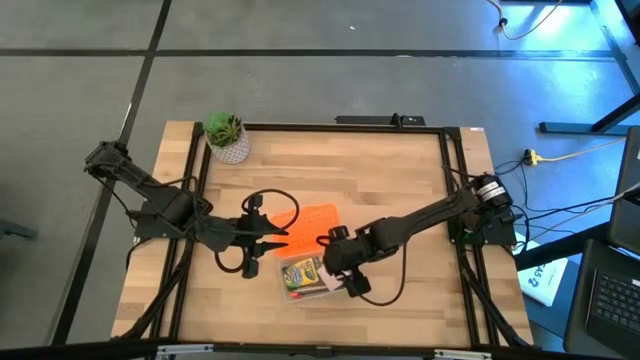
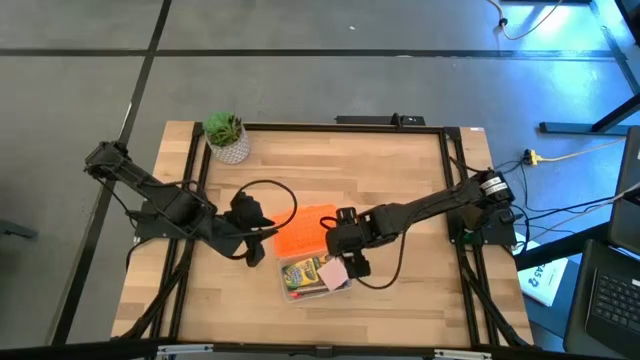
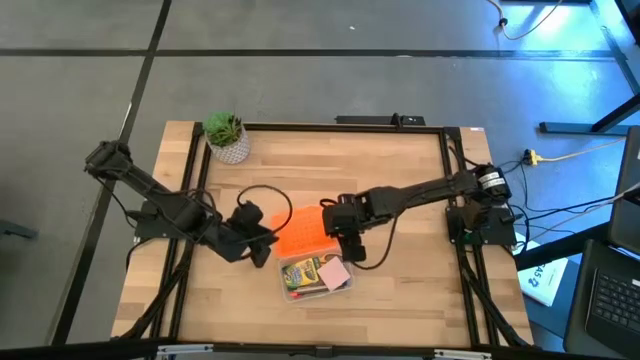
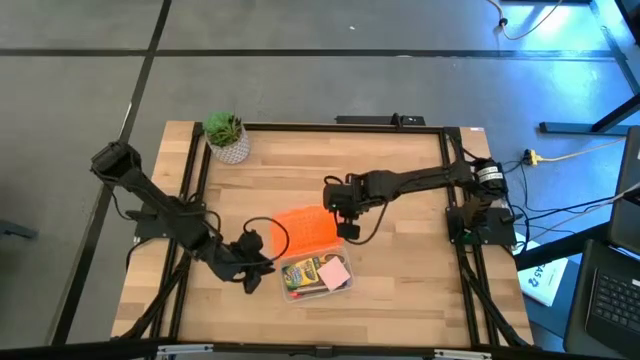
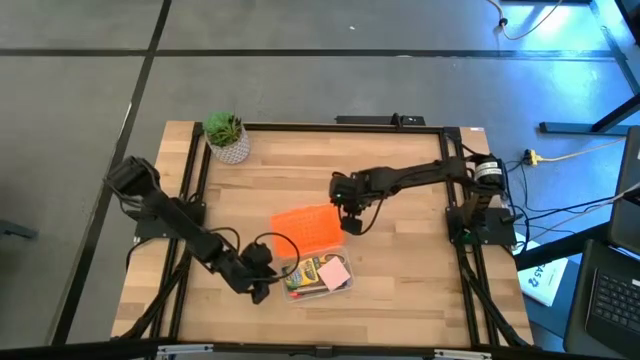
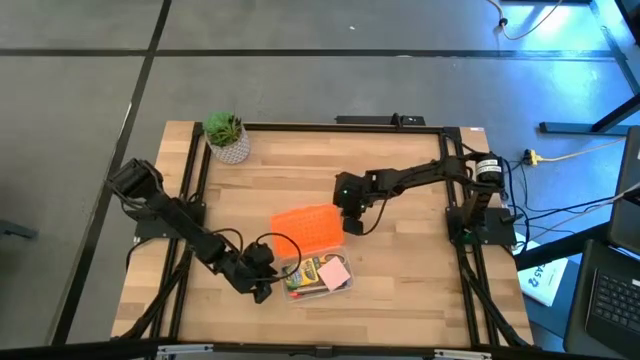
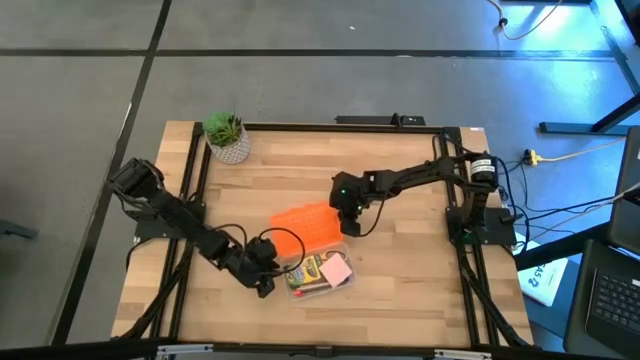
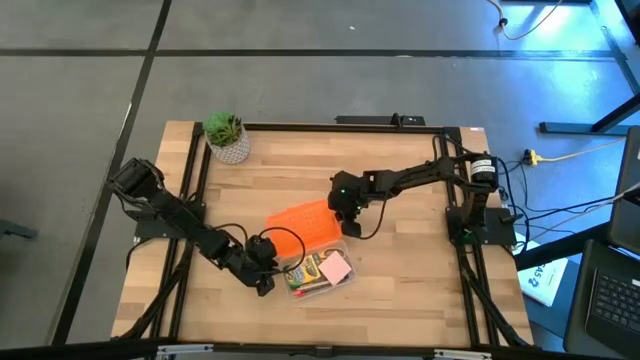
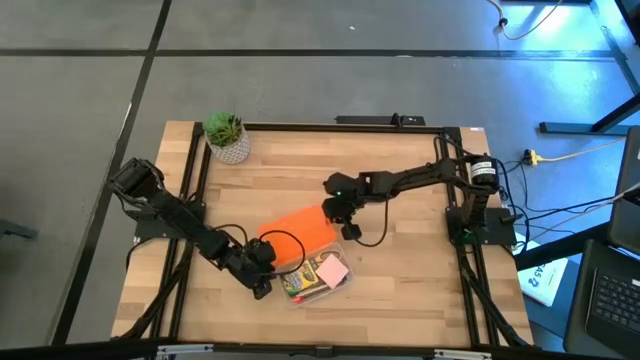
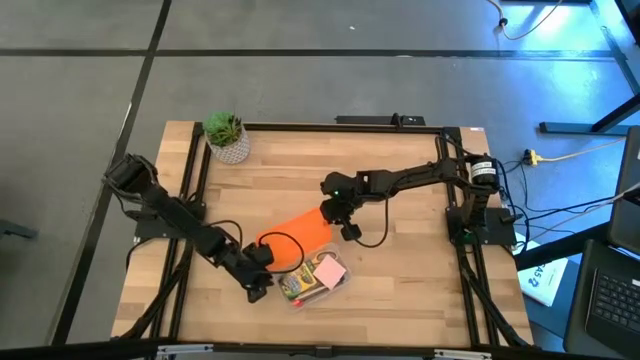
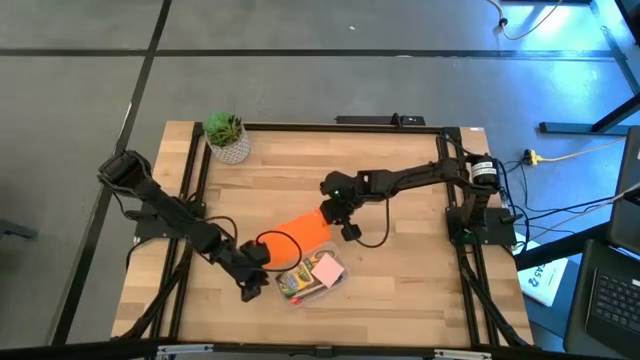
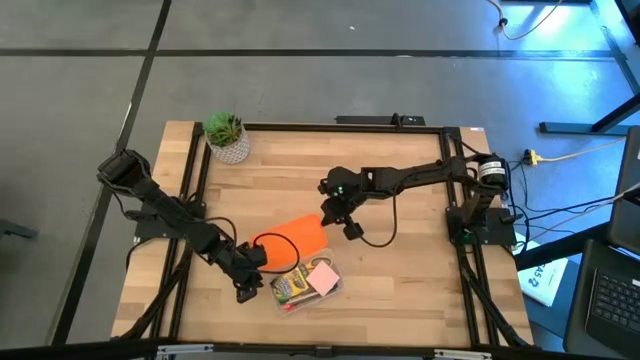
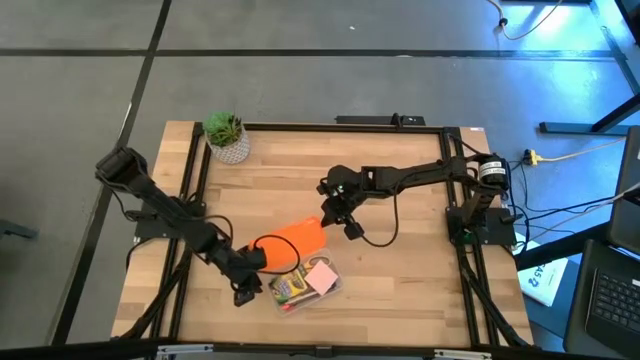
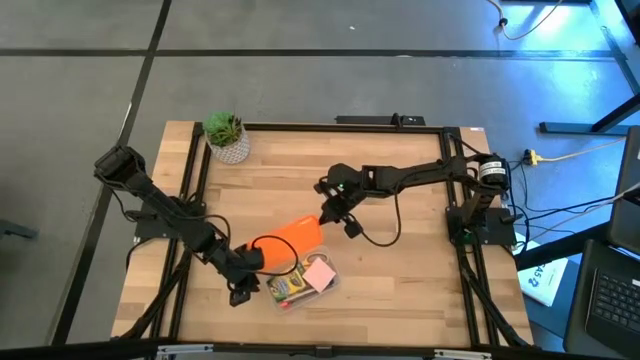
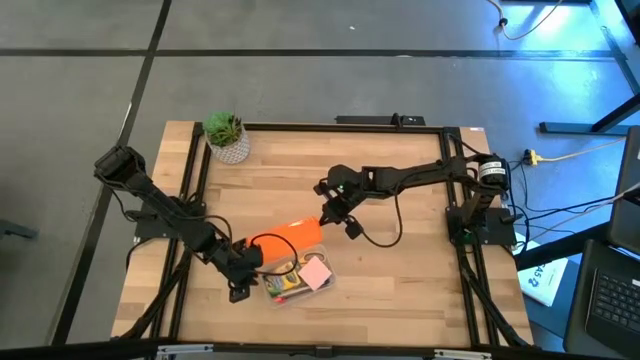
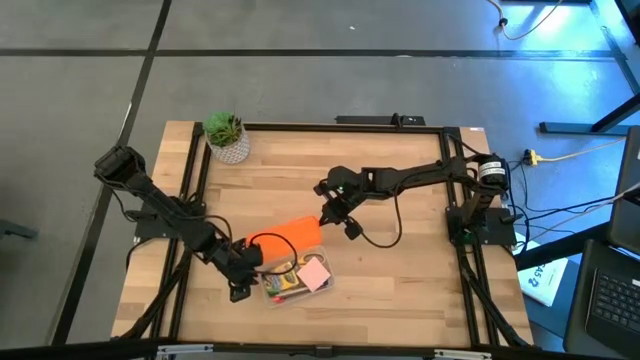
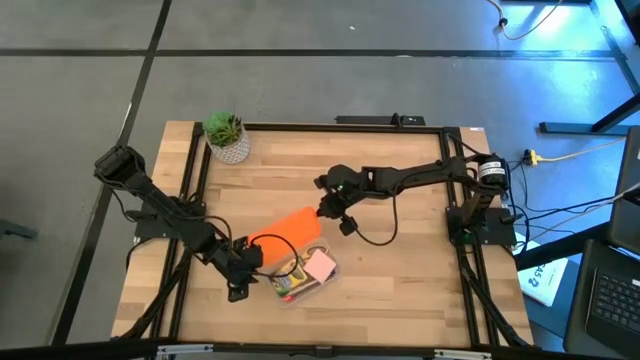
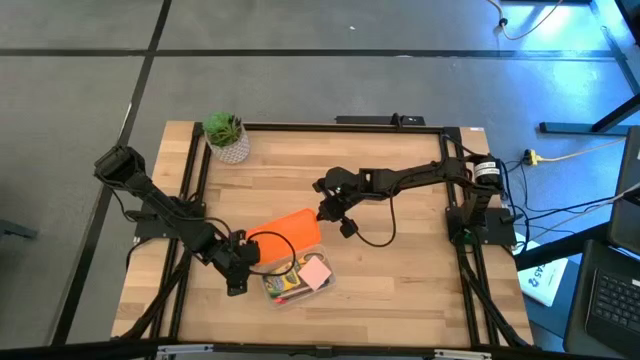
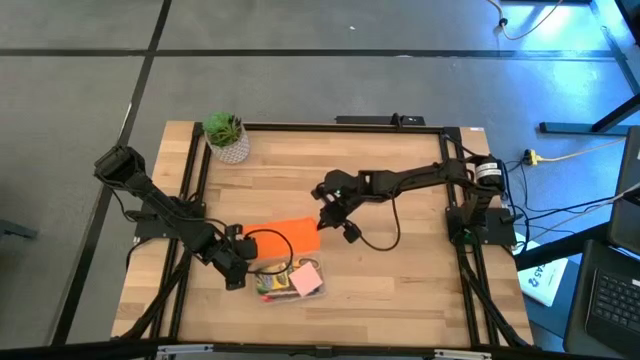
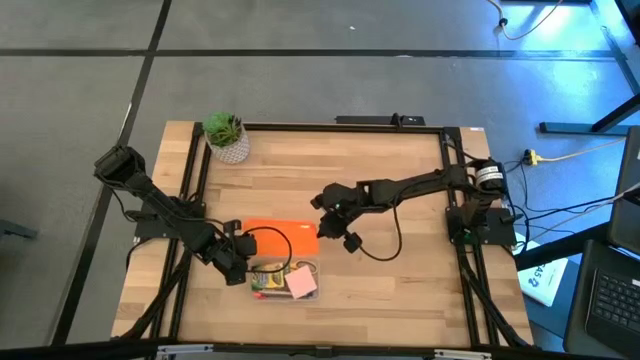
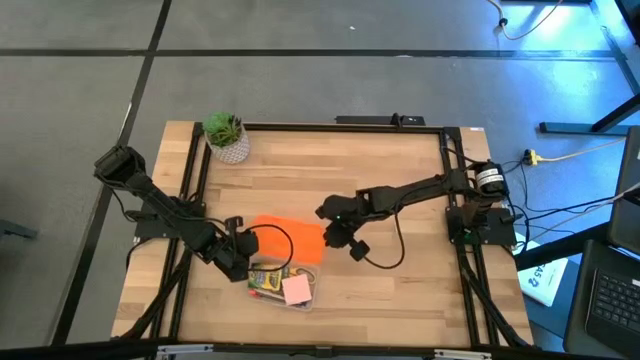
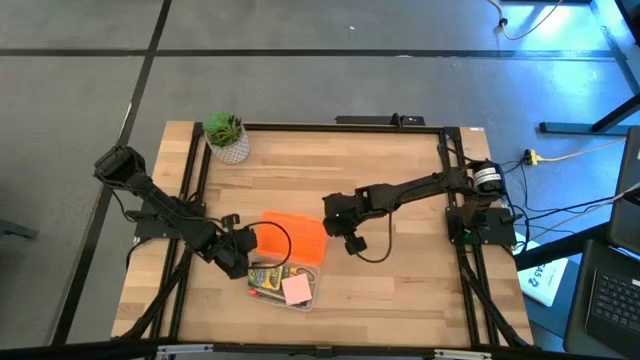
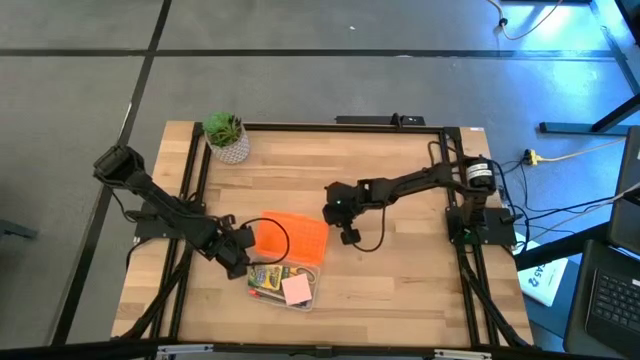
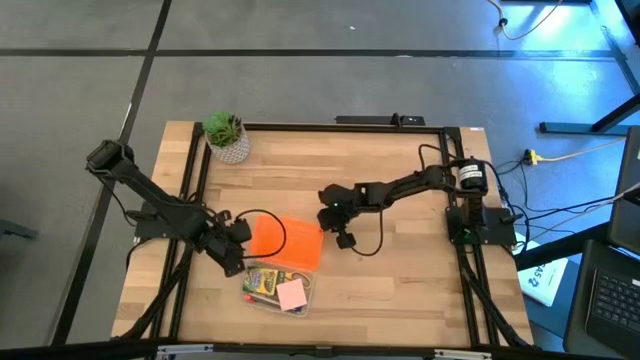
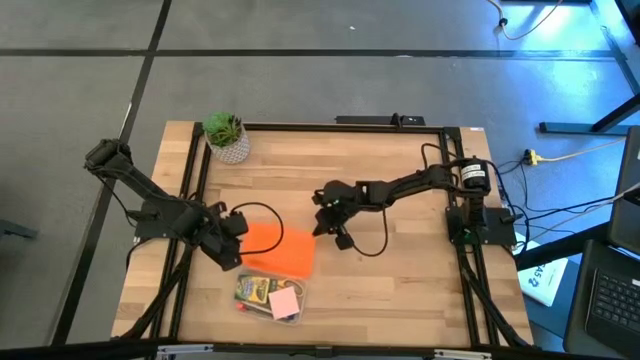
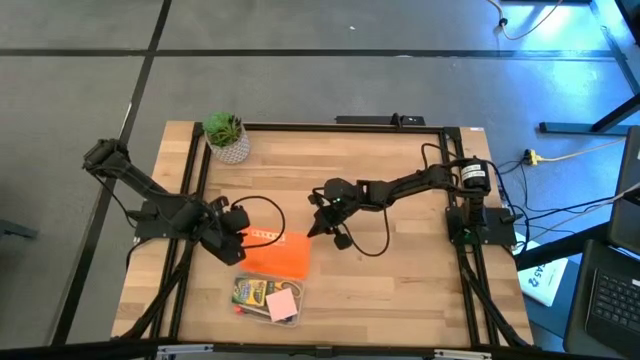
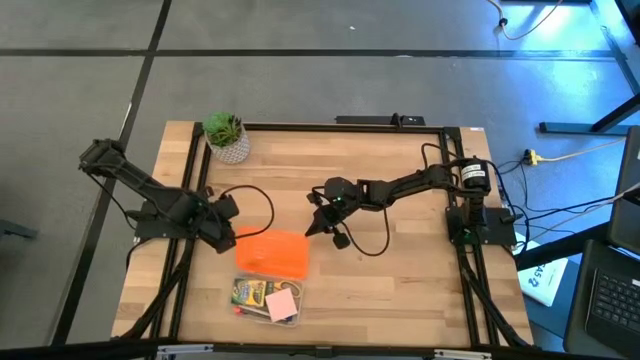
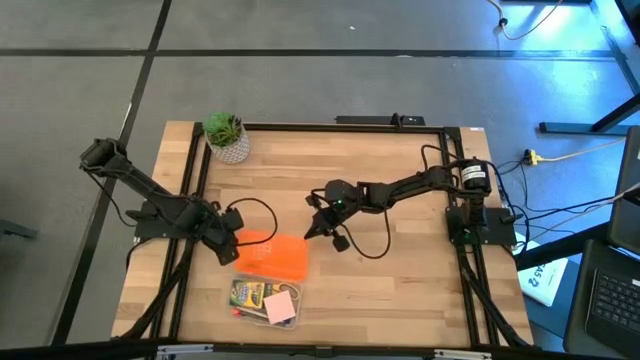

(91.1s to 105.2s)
Task: Pack school essentials
Close the orange supply box

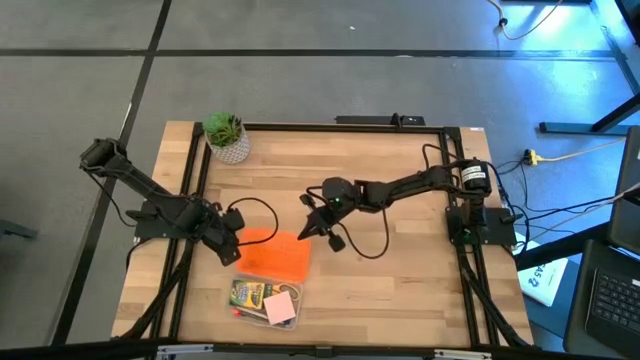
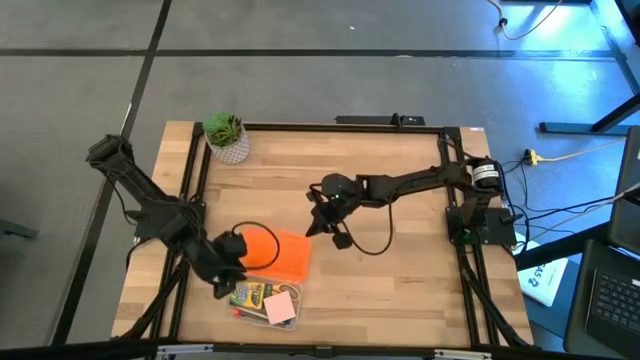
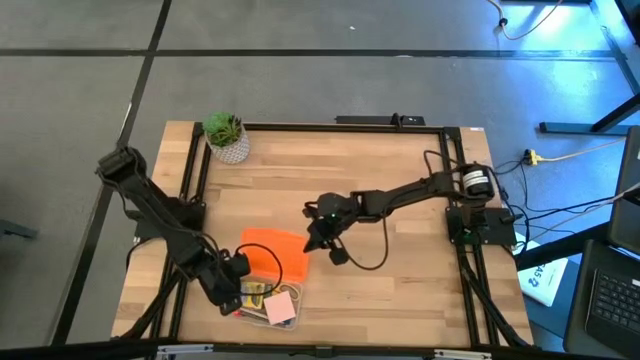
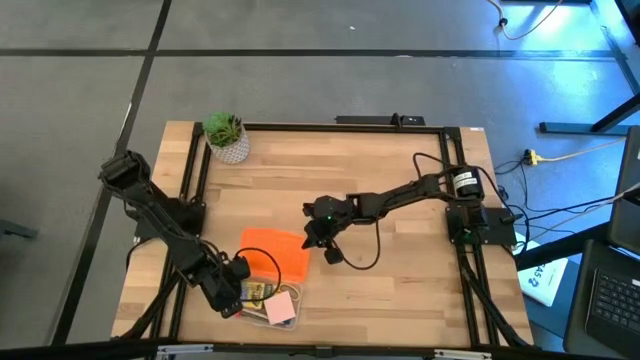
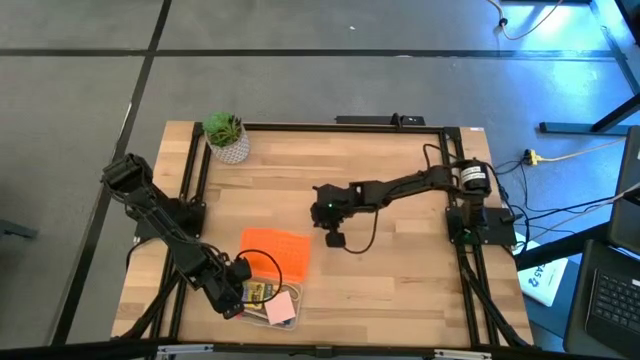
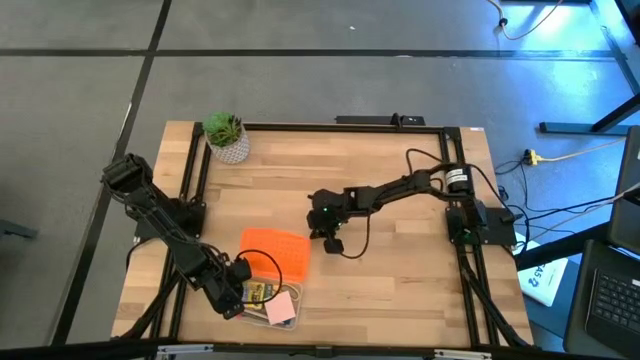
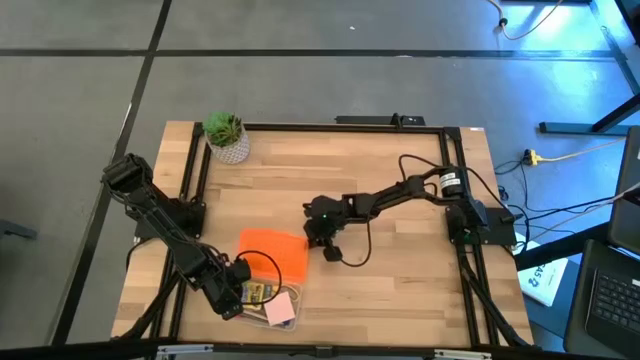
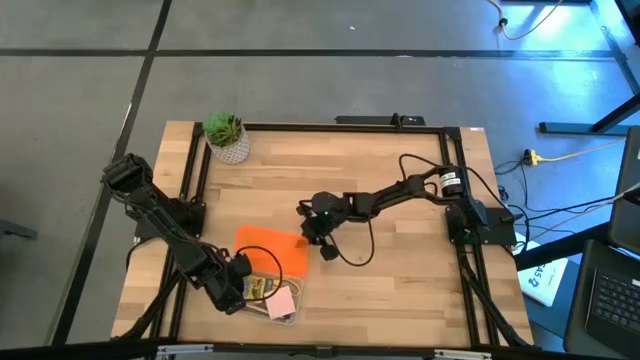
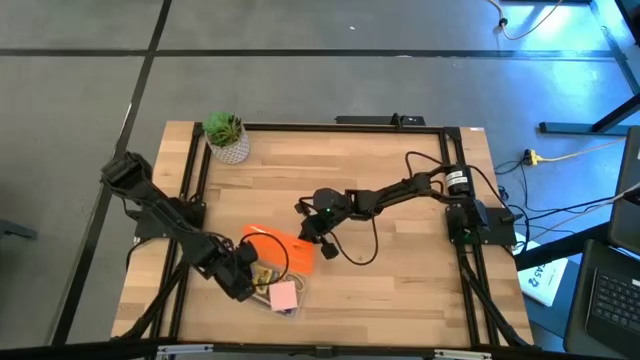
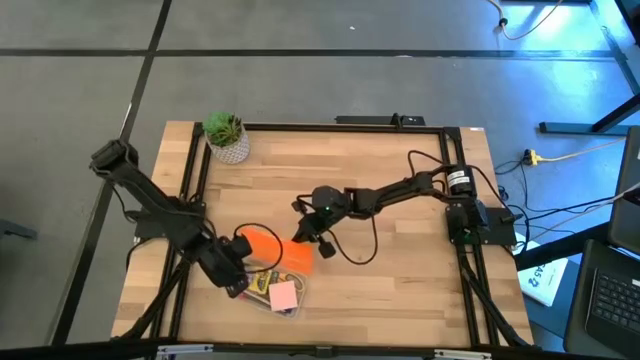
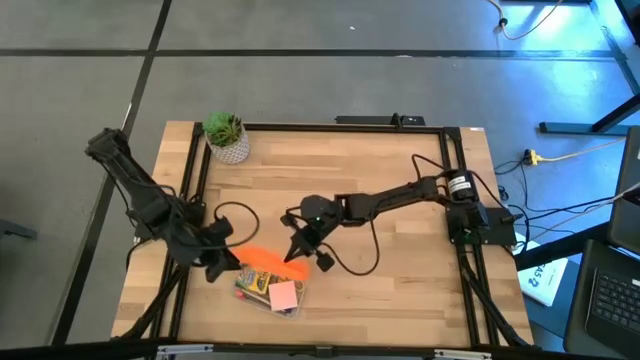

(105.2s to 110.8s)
Close the orange supply box

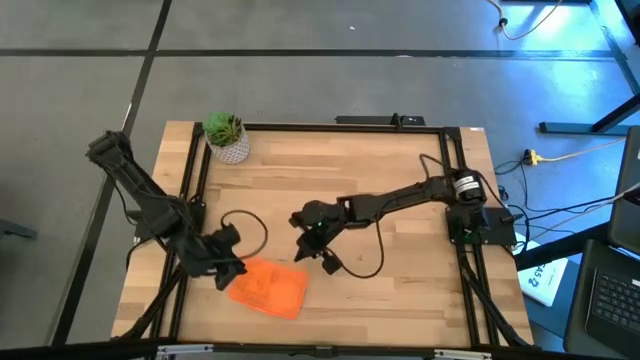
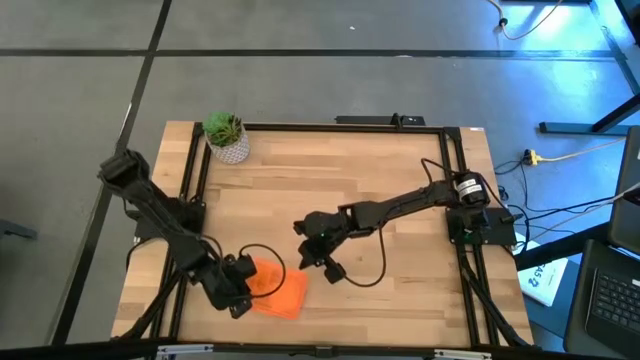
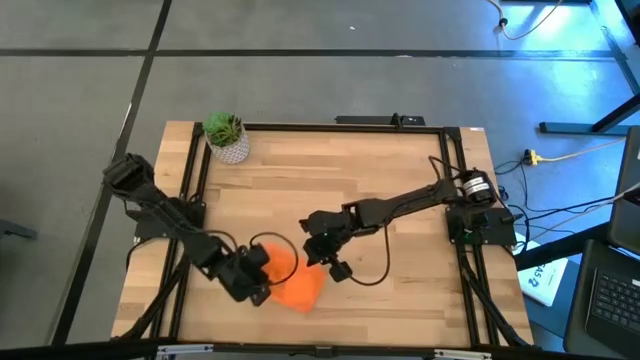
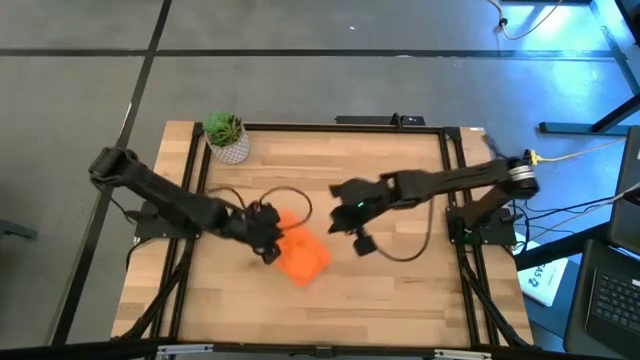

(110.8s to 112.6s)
Move the orange supply box to the center of the table

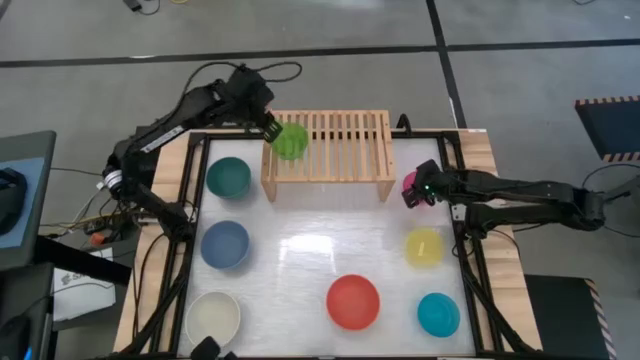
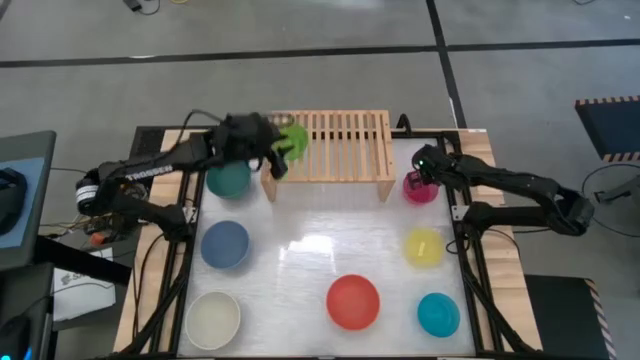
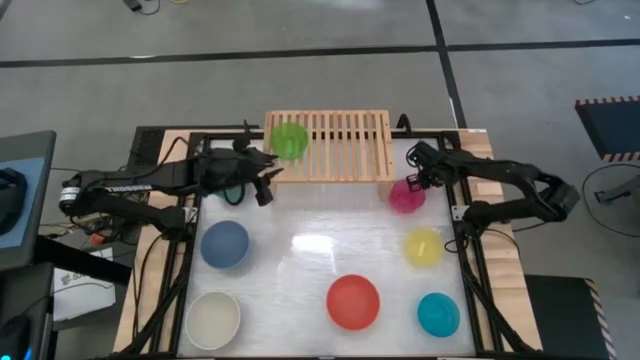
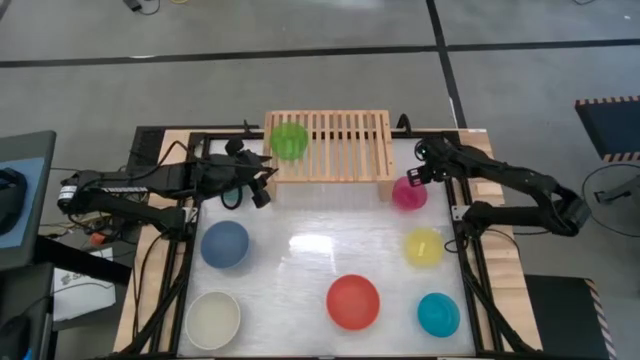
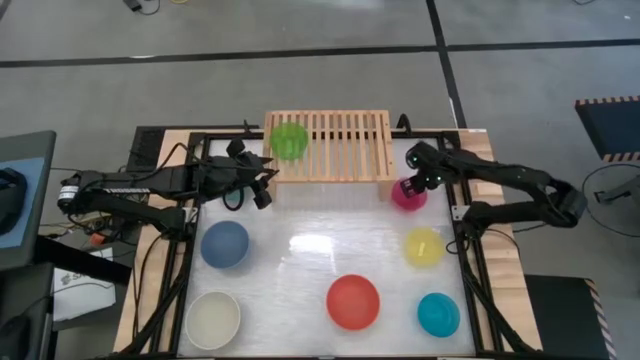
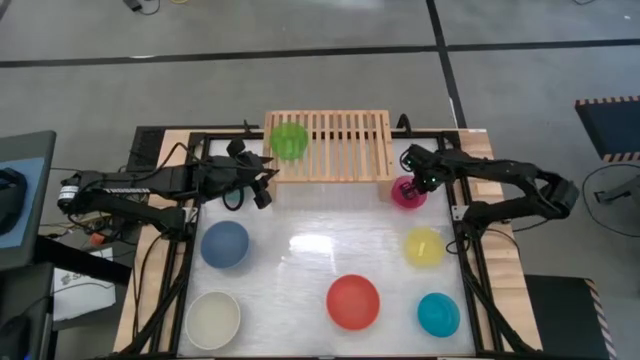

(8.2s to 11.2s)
Task: Place and stack bowls onto a shelf
Stack the red transparent bowl on top of the green transparent bowl
